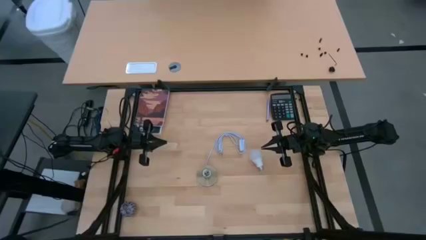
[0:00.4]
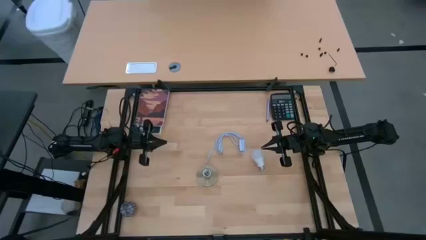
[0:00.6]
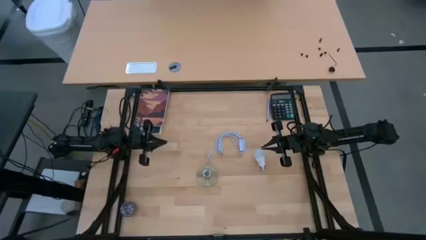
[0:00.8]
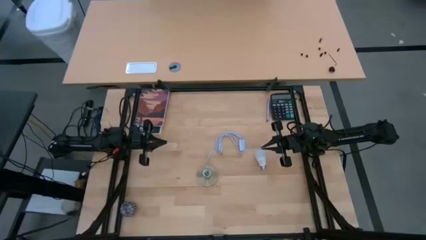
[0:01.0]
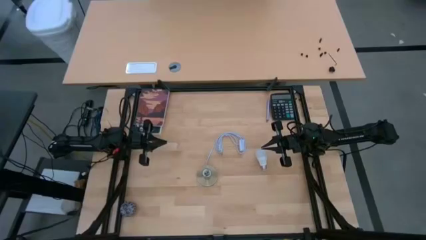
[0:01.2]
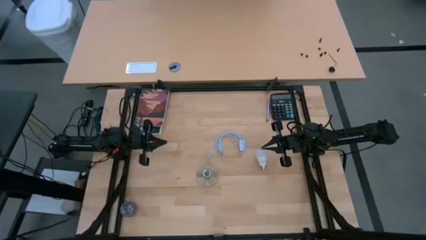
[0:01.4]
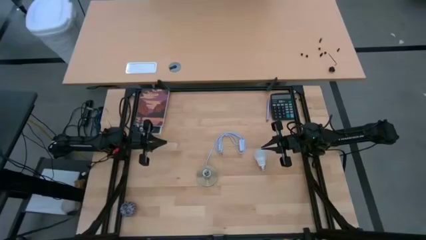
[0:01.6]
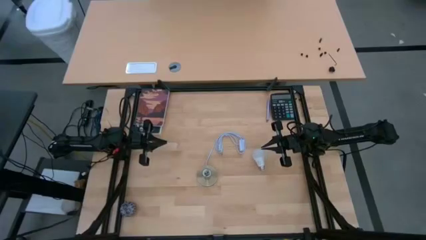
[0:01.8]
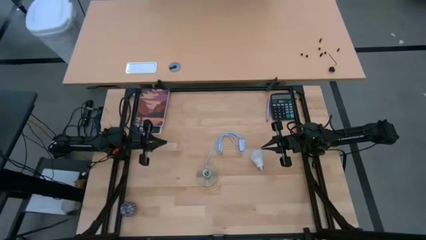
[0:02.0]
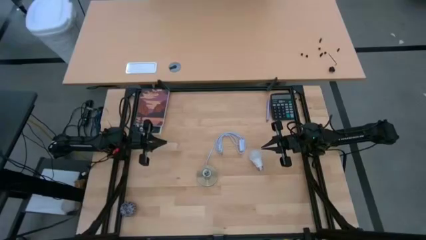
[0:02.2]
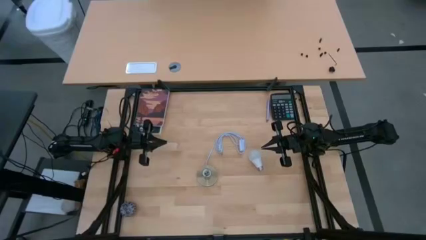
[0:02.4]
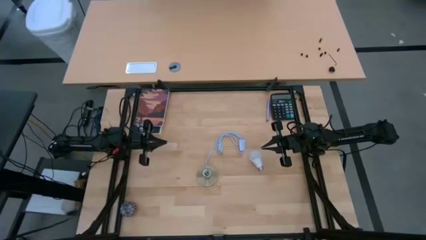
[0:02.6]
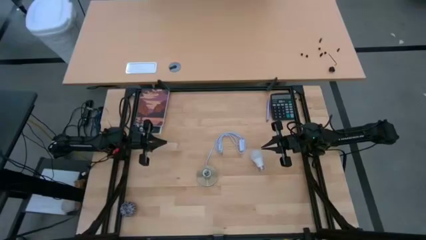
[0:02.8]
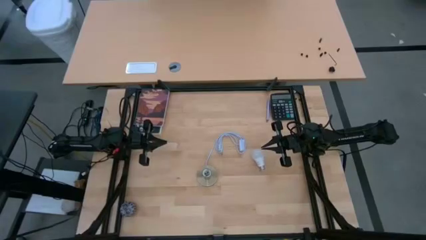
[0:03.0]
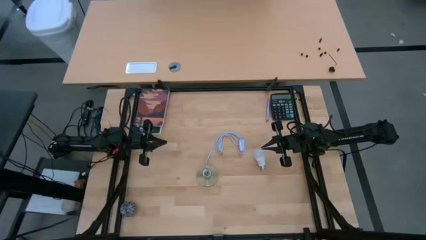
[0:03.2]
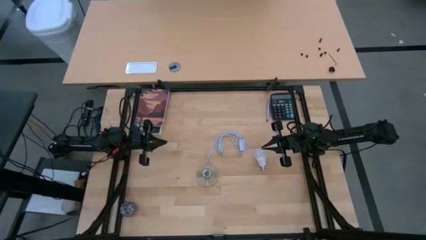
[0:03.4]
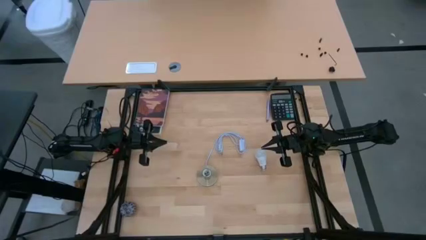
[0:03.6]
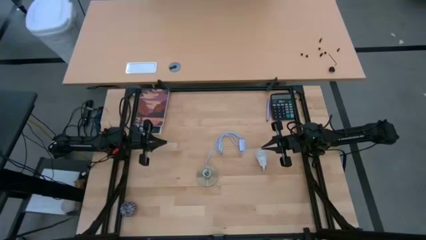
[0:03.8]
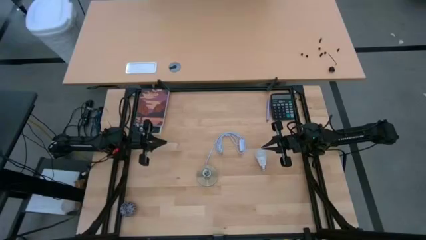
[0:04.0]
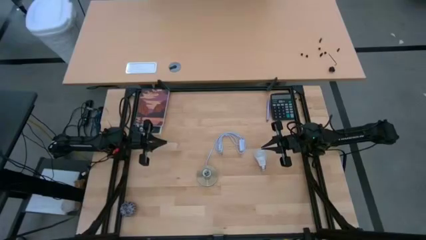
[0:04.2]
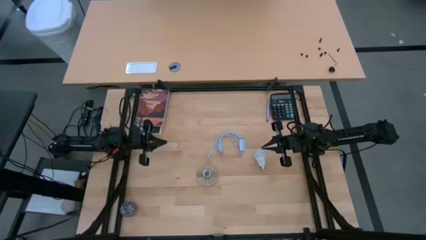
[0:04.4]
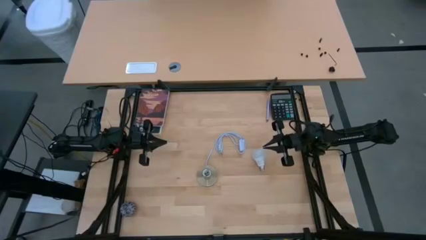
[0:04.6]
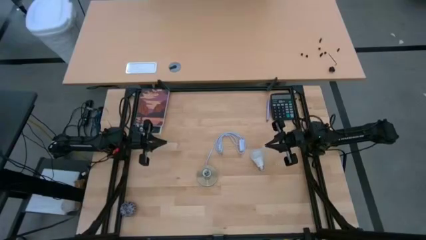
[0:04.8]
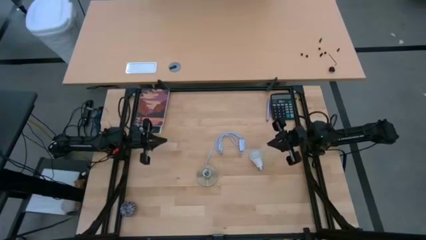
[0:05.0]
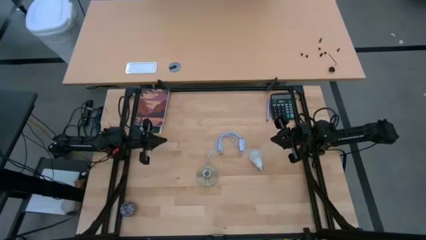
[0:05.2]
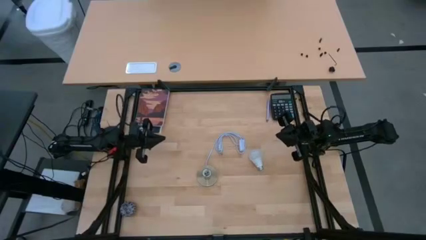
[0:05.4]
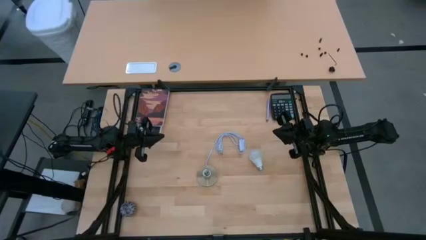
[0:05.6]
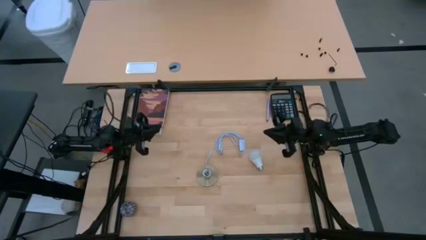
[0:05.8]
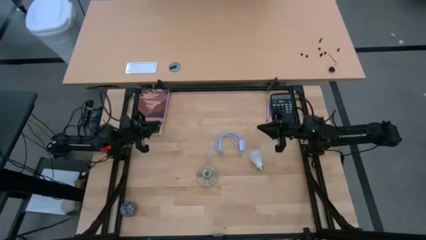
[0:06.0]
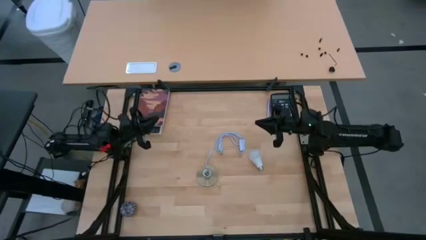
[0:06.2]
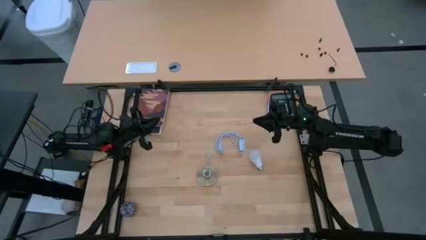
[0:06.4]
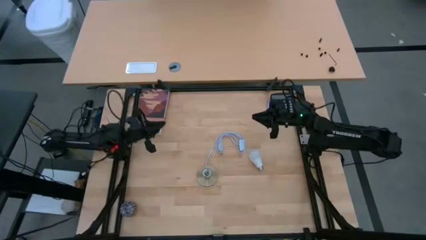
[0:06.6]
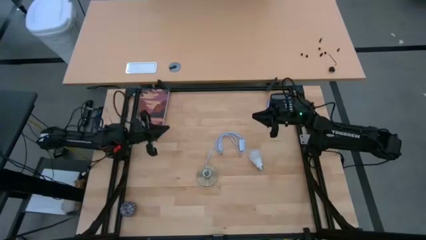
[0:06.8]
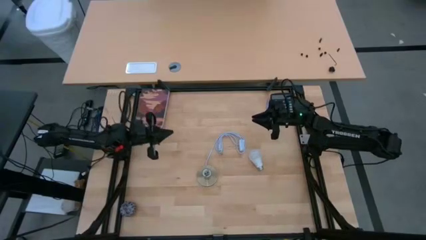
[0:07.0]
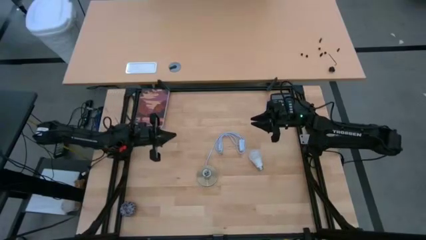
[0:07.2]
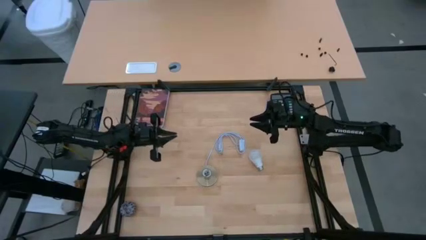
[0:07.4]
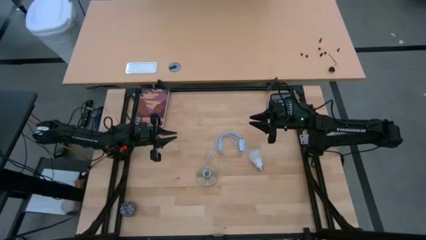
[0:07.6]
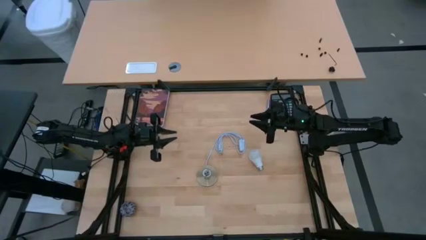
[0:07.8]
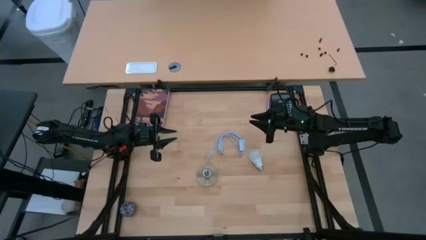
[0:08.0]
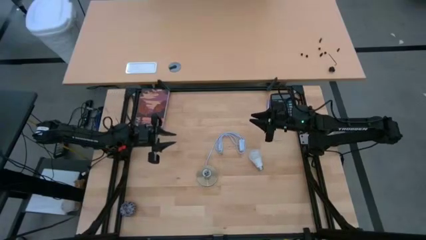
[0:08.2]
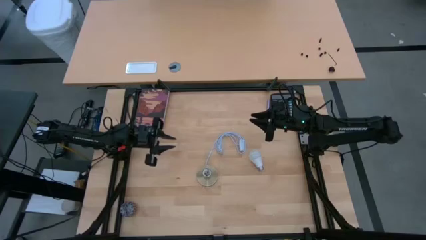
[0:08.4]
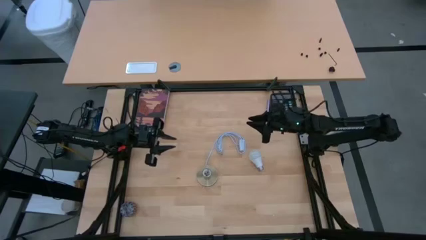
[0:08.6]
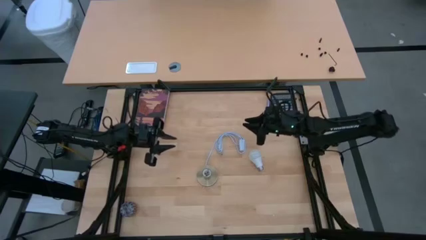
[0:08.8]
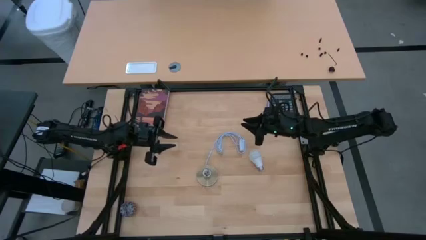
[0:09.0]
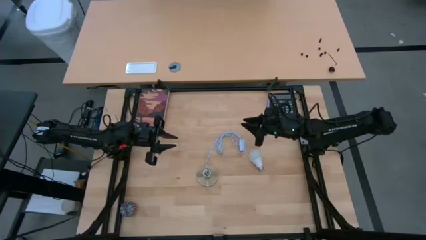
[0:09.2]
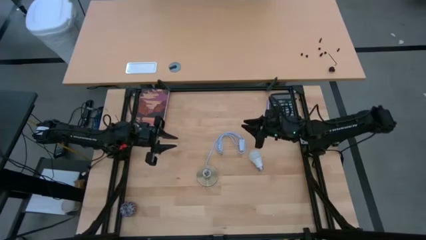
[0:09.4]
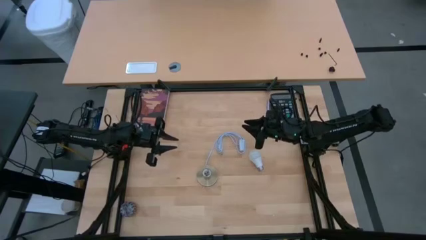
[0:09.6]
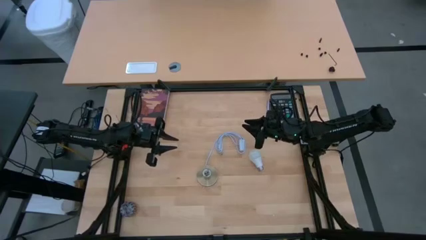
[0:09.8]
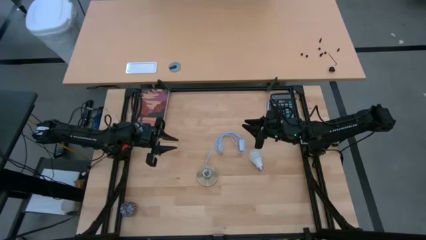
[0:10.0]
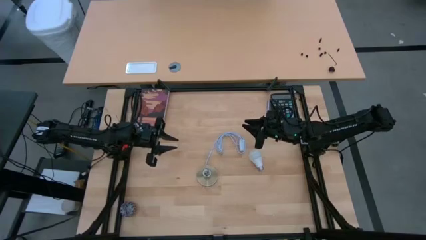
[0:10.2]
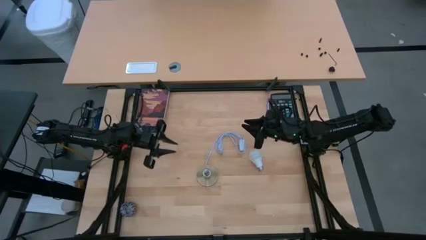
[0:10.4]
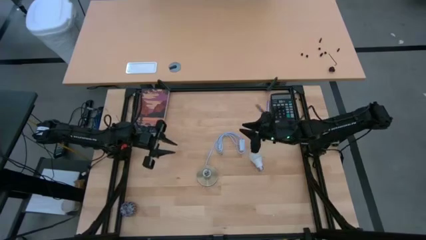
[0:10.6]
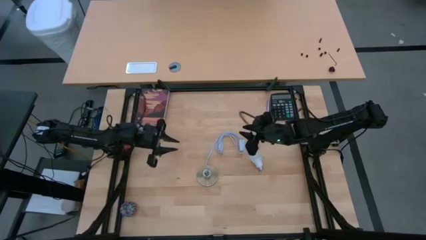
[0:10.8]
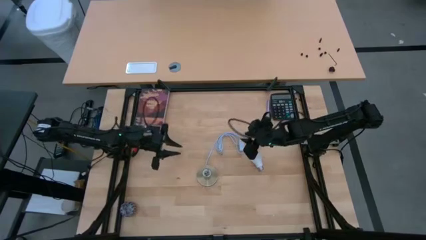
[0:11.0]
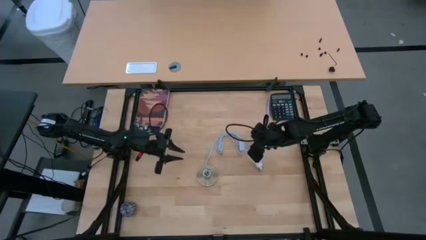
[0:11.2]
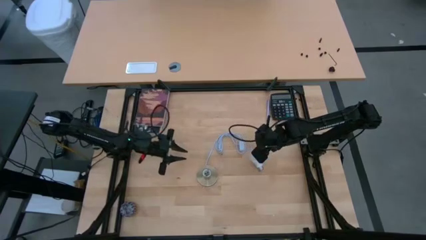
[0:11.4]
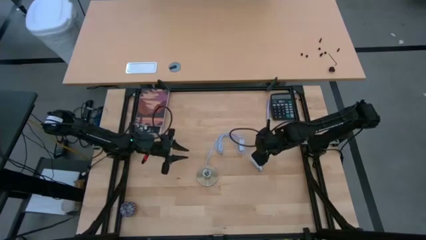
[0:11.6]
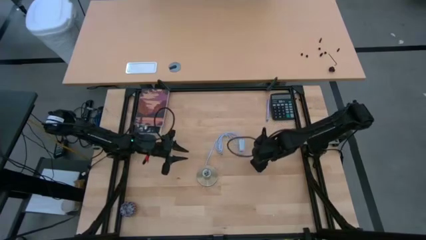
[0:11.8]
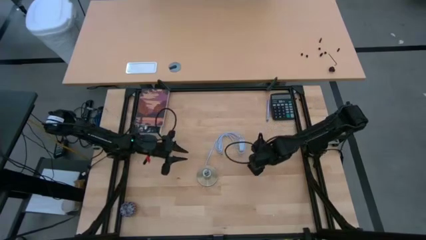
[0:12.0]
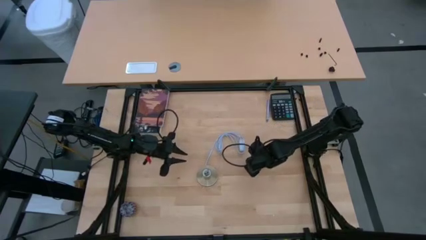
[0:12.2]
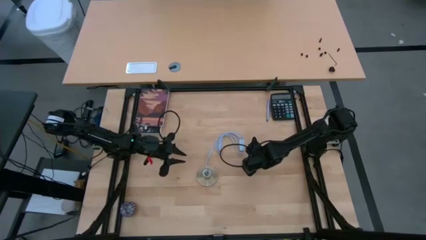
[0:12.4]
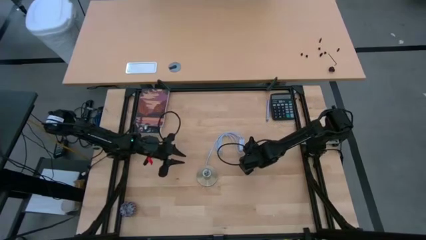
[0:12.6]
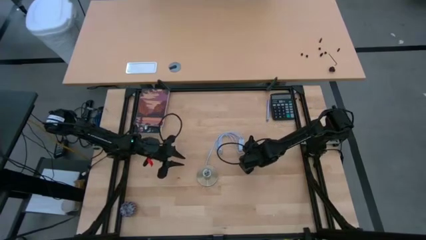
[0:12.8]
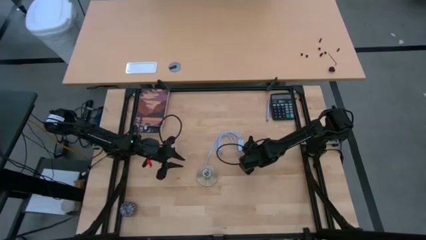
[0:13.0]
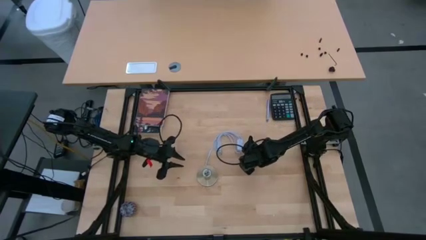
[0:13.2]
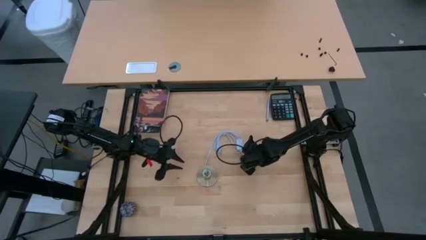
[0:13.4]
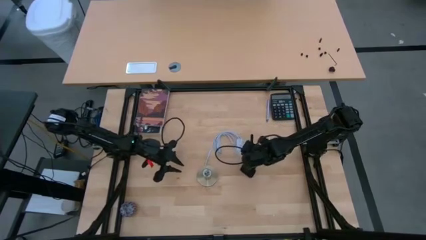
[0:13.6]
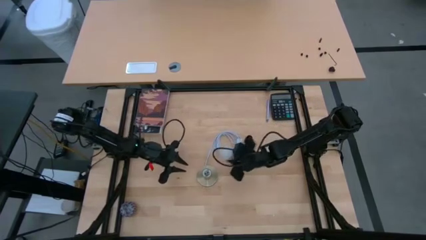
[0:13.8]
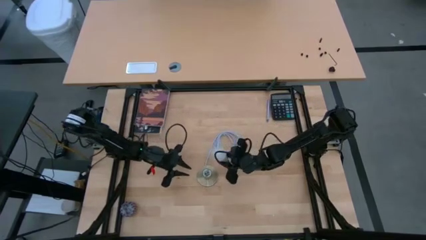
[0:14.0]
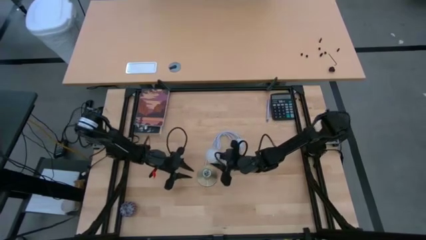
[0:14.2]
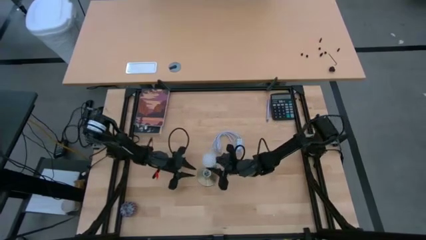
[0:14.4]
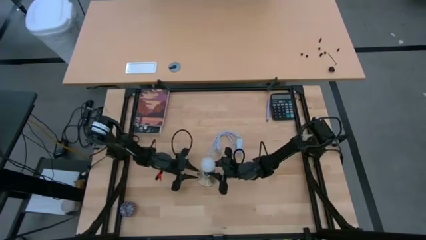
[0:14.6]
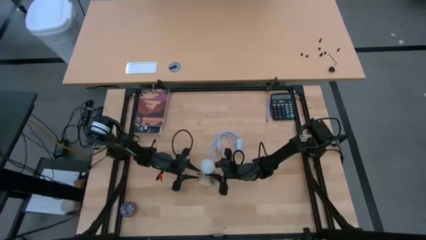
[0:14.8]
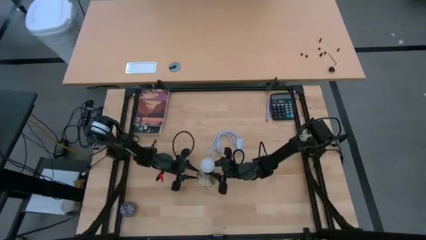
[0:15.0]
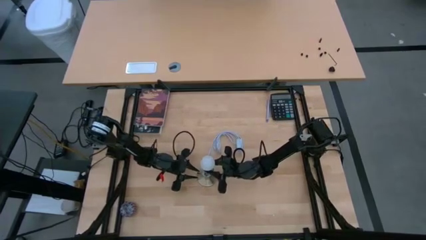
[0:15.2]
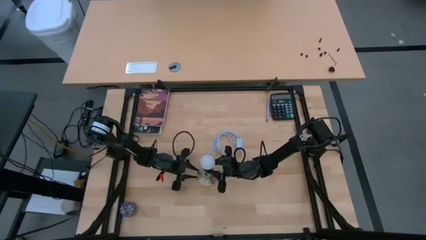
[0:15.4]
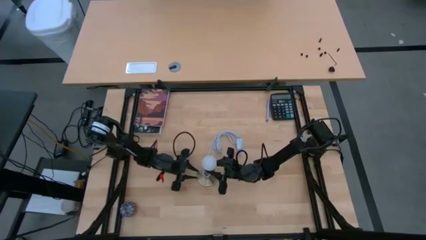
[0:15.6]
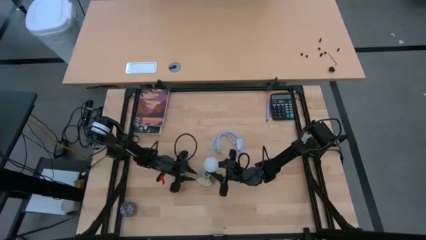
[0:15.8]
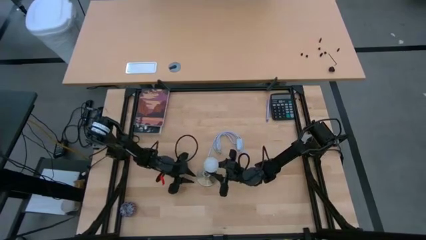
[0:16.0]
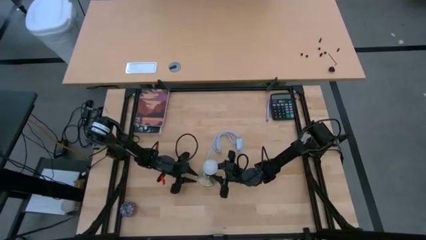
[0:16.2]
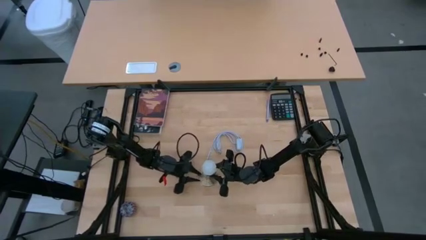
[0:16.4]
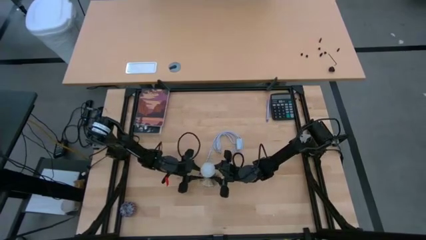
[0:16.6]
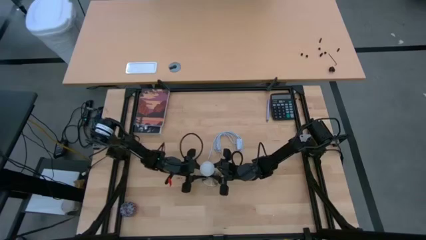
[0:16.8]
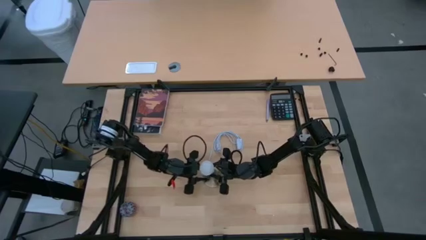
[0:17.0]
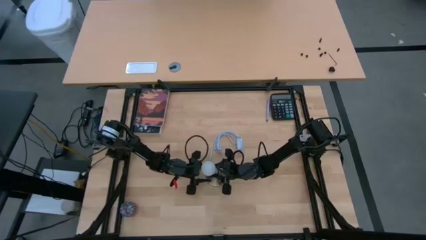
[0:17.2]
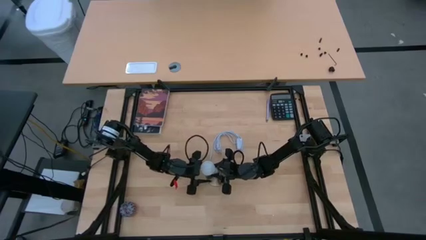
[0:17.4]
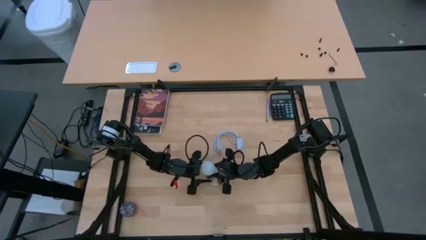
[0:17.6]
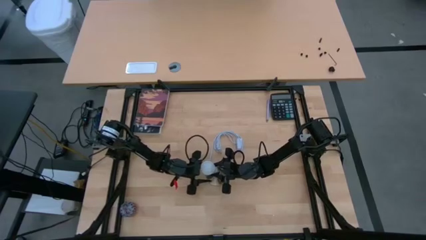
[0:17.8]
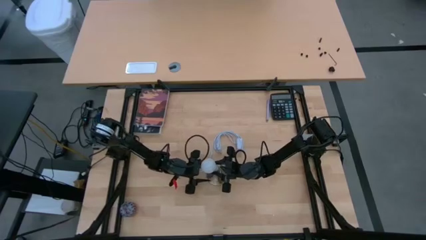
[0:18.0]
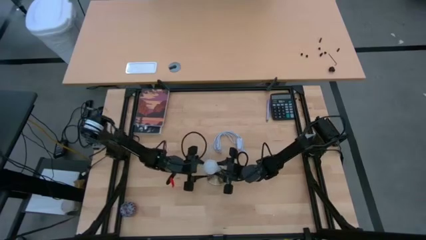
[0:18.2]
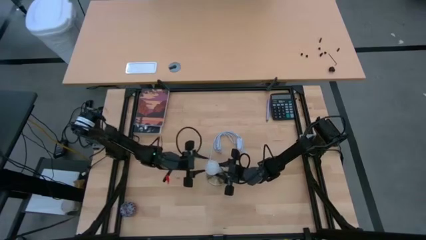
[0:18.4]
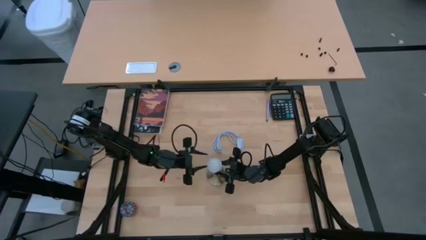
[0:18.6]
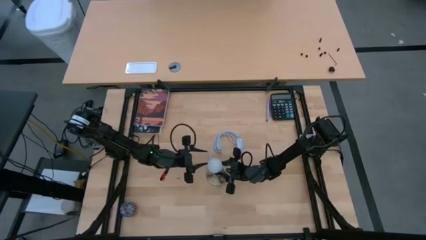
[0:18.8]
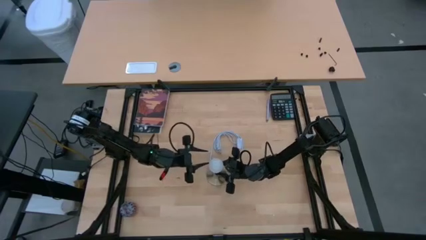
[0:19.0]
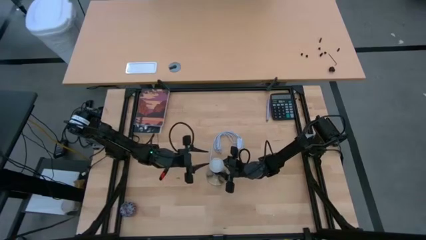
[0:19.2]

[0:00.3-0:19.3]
Task: Screw lightbulb
Insert the lightbulb into the lamp
